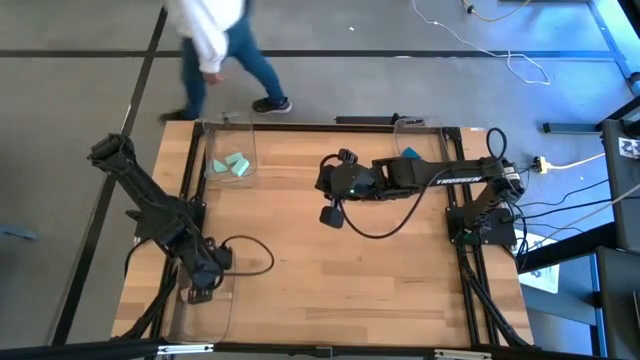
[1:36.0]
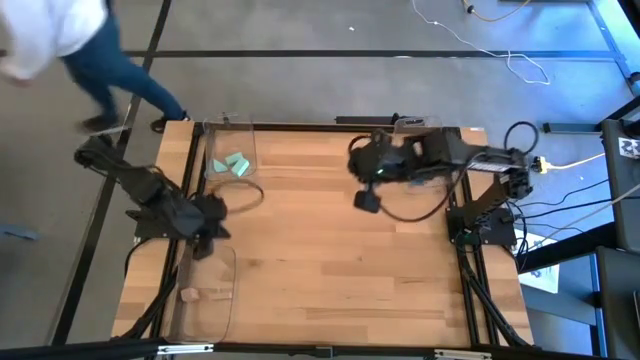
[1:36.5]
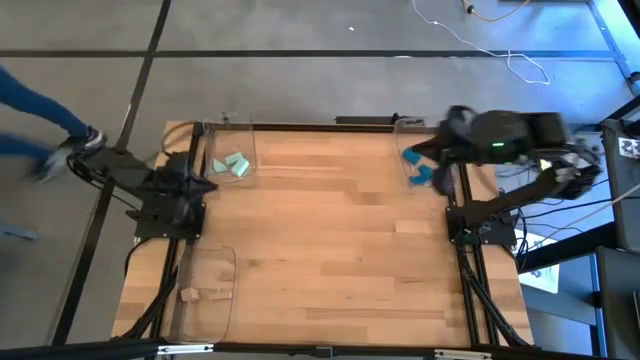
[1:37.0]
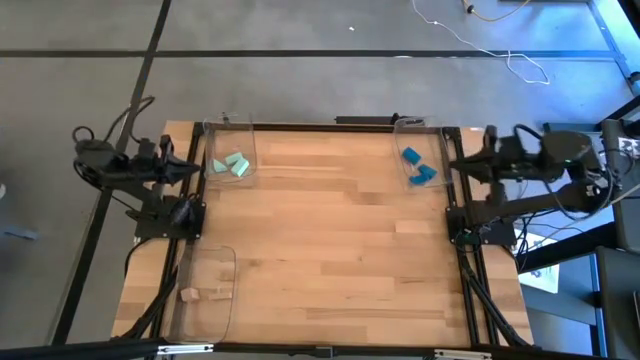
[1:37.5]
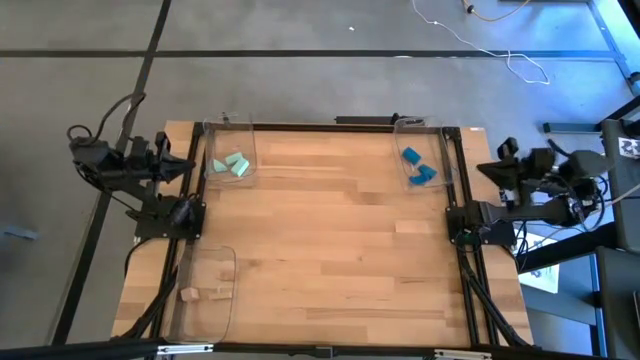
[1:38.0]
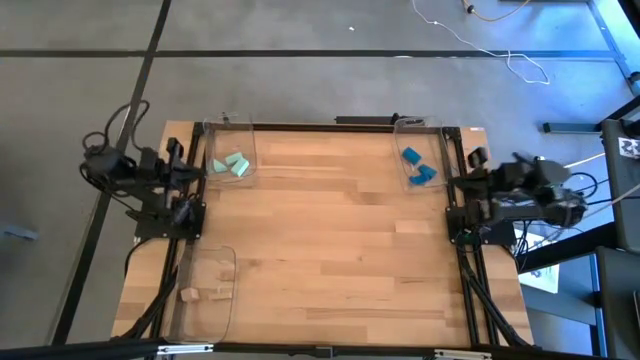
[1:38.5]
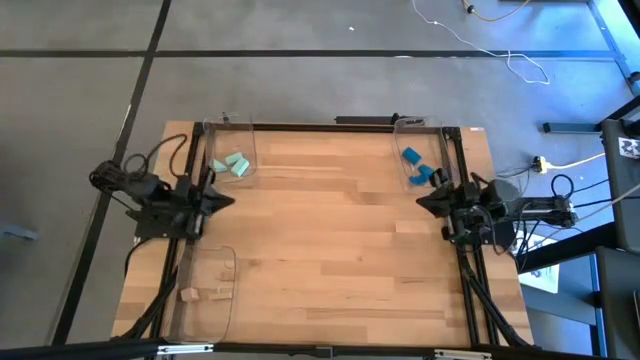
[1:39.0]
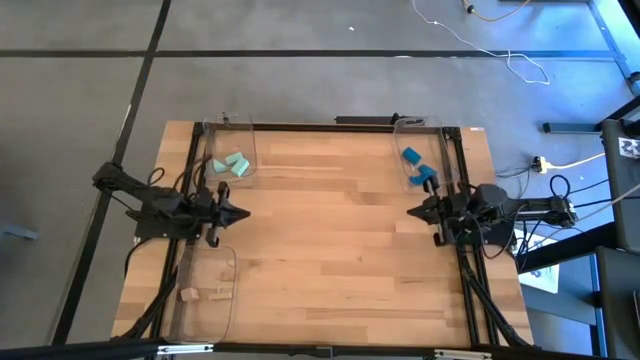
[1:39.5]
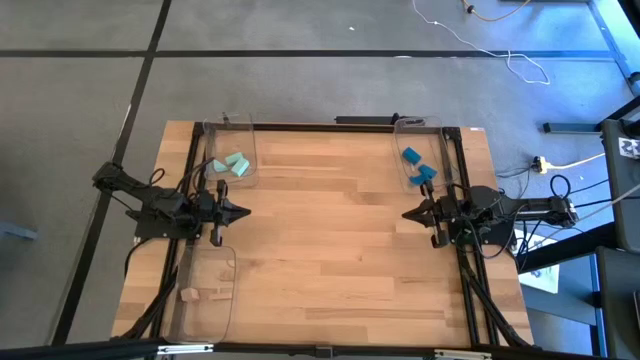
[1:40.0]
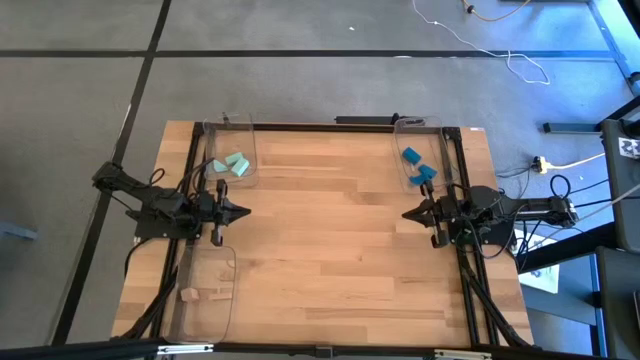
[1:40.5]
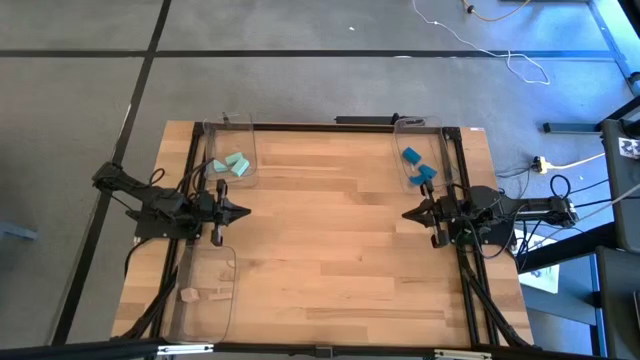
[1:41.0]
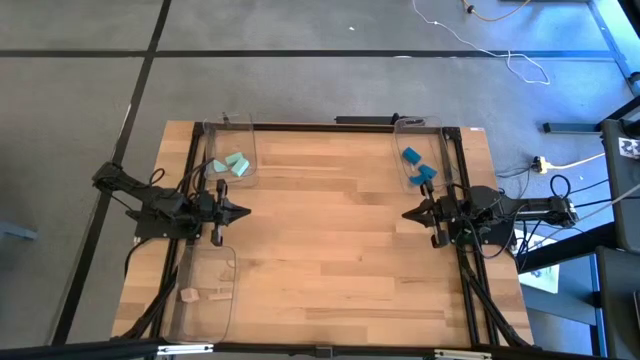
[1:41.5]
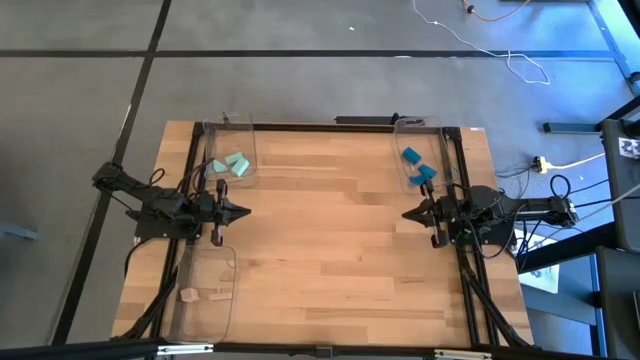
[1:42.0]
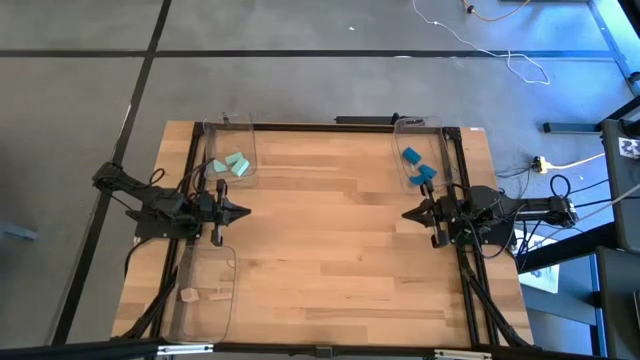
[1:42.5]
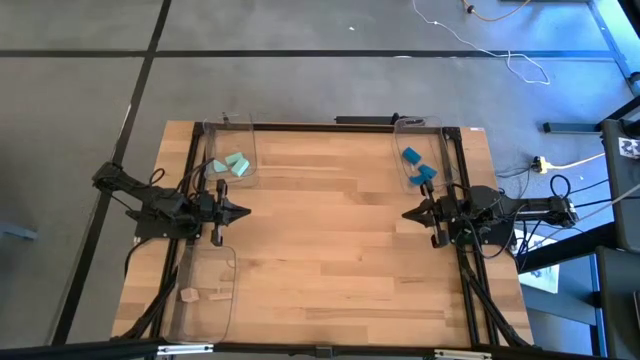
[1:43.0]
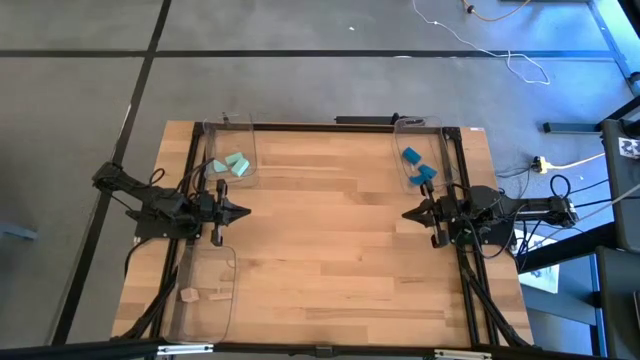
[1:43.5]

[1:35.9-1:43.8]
Task: Sort & place blocks by color
Return to home position

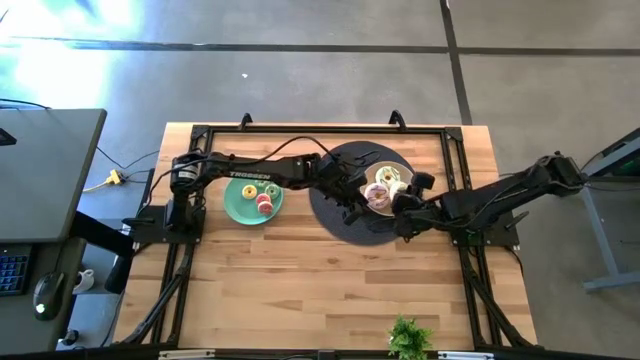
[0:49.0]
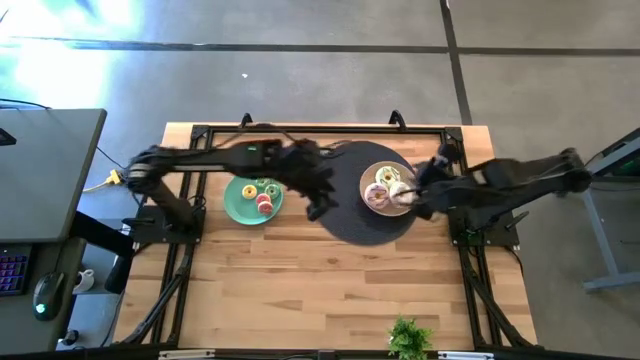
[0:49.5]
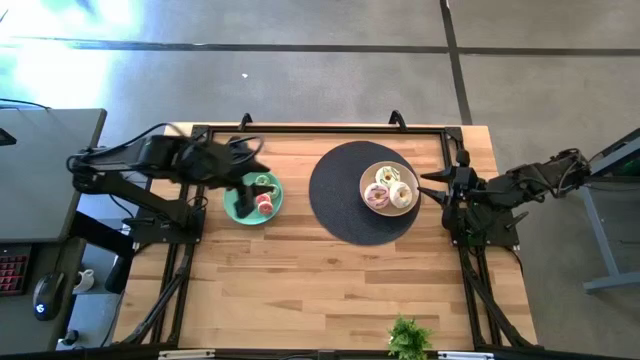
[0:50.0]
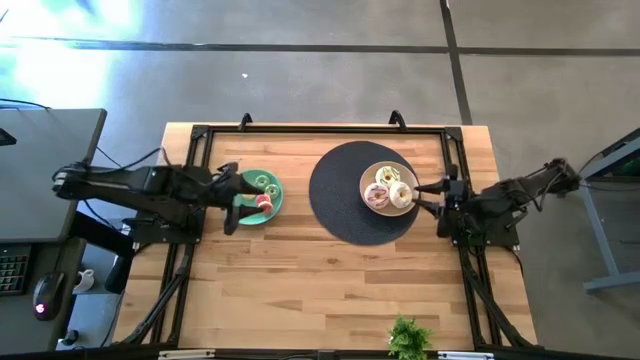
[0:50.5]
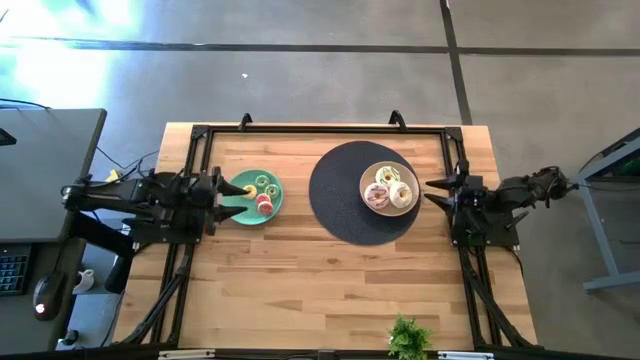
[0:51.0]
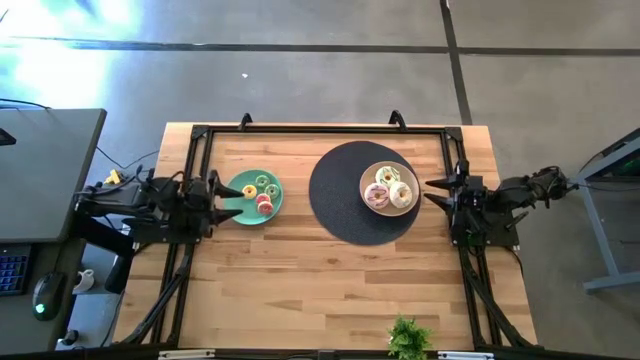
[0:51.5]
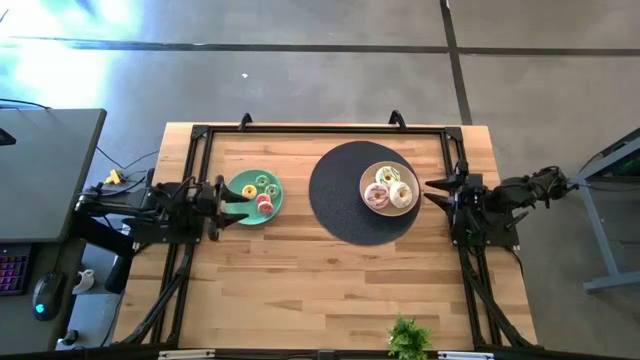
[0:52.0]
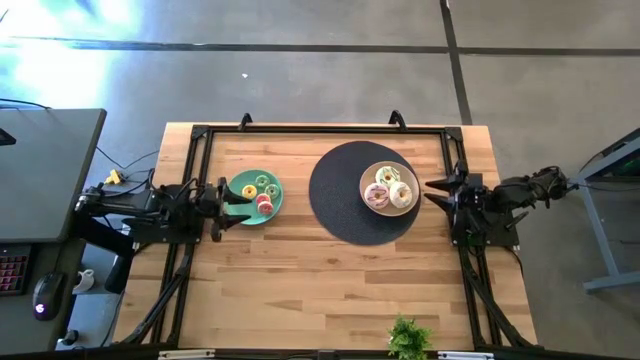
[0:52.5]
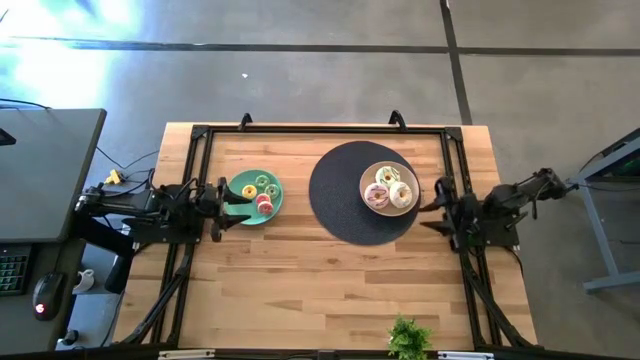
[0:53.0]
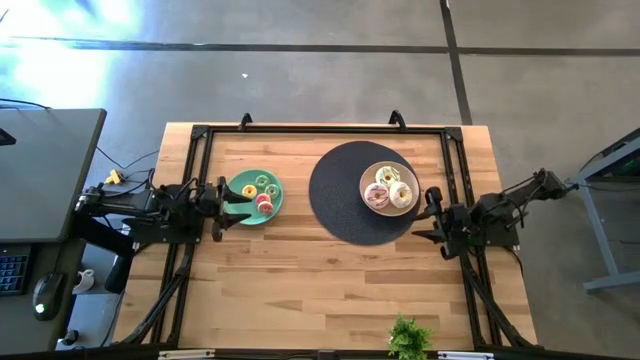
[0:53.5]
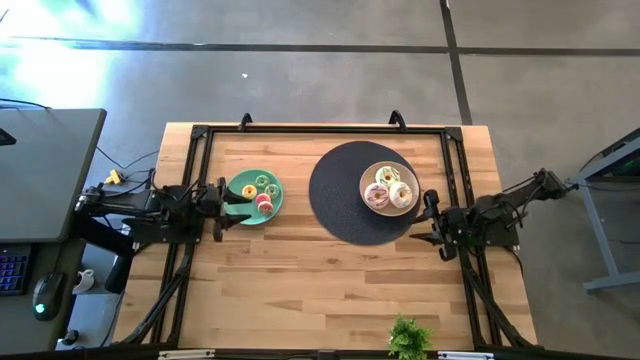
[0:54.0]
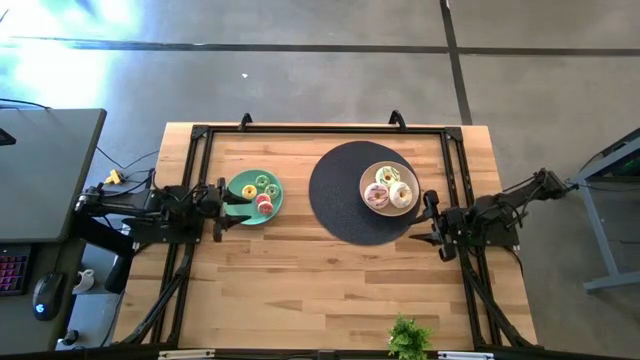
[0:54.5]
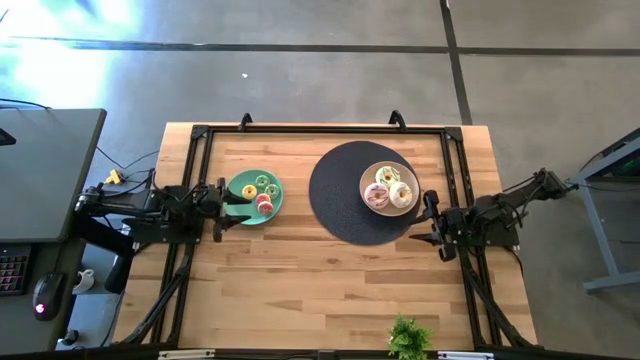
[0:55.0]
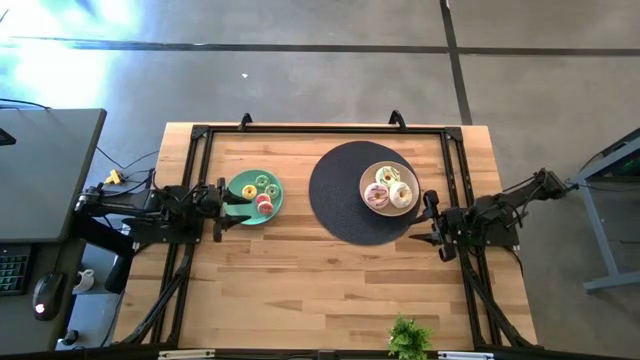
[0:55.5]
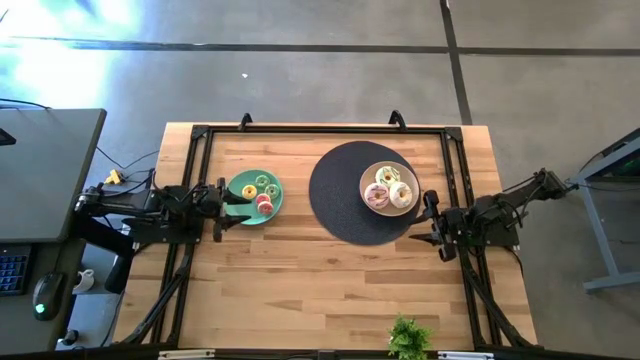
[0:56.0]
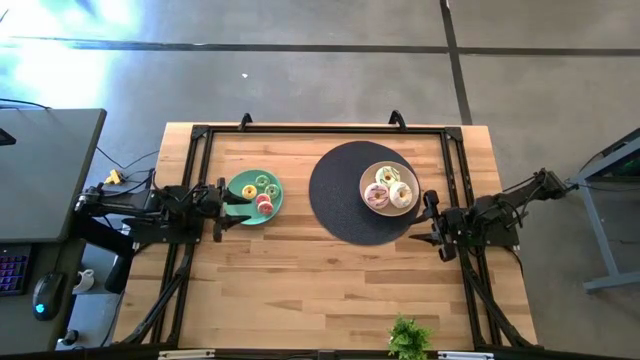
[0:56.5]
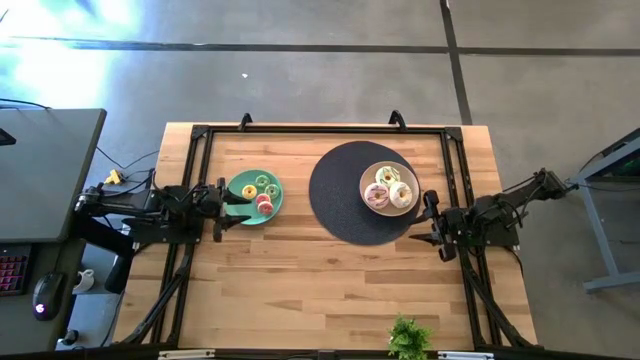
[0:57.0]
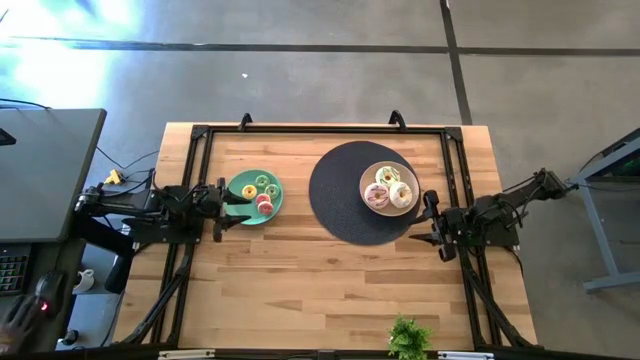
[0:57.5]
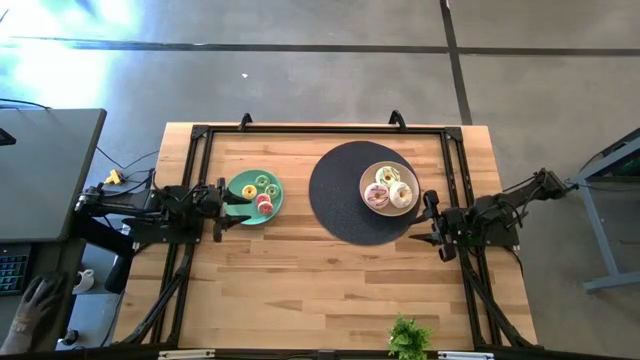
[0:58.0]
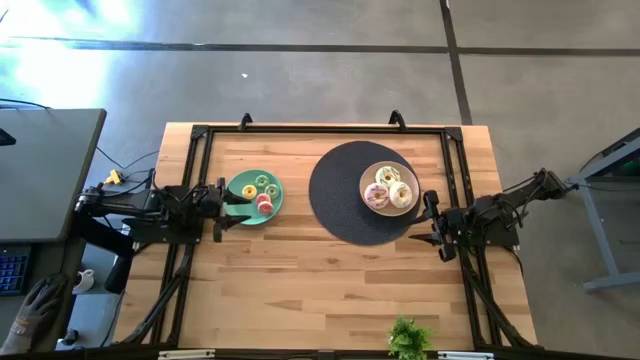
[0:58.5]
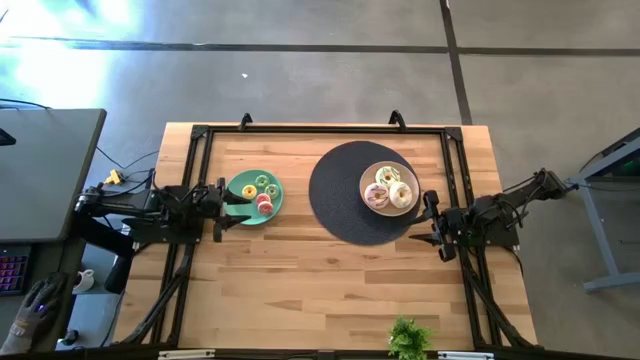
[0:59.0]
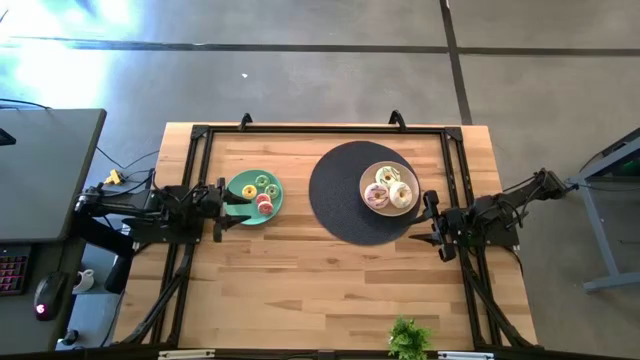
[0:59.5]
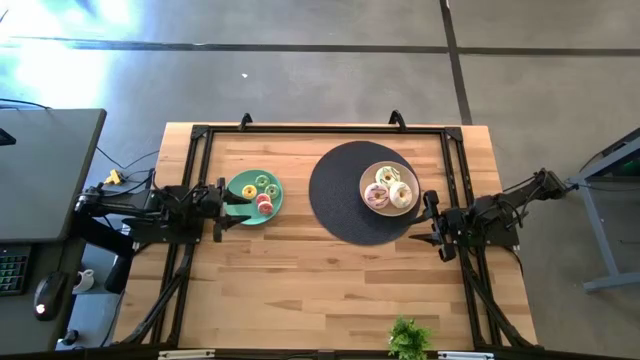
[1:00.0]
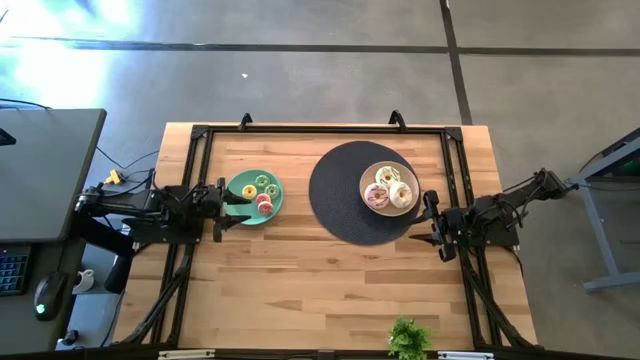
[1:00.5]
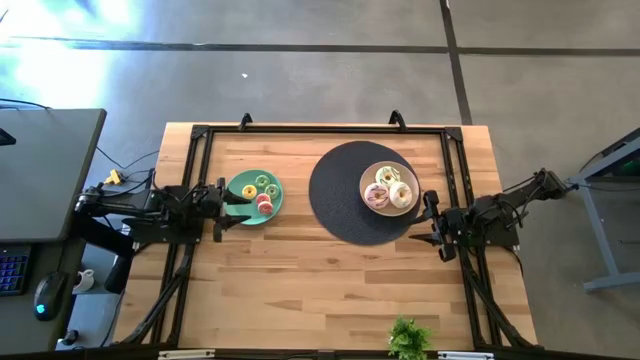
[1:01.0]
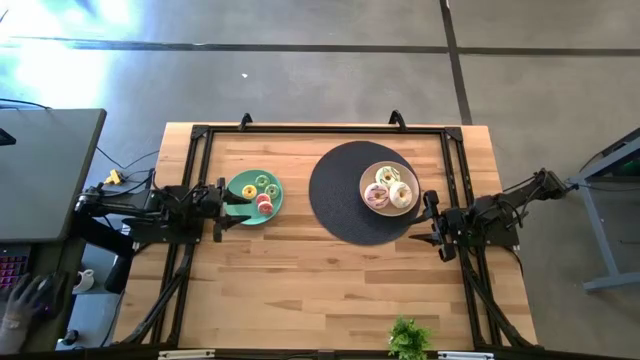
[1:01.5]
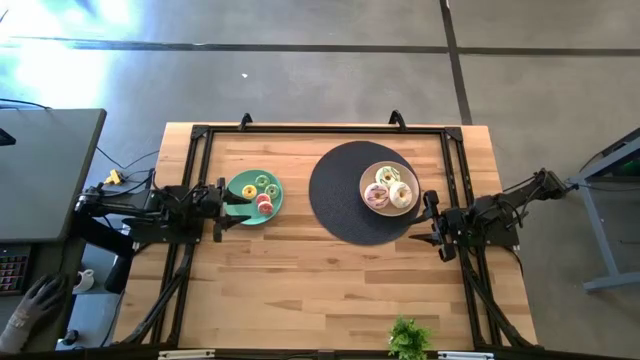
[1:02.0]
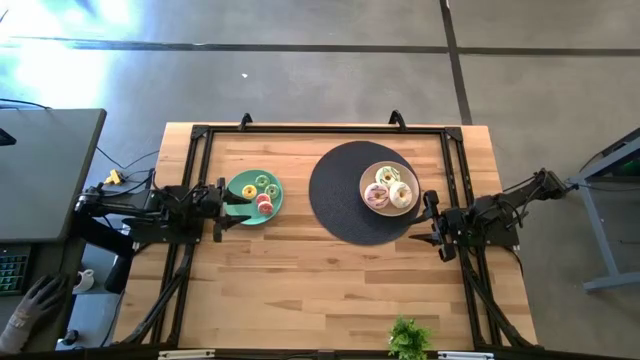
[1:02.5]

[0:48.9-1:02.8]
Task: Pick & Place donuts
Return to Home Position
